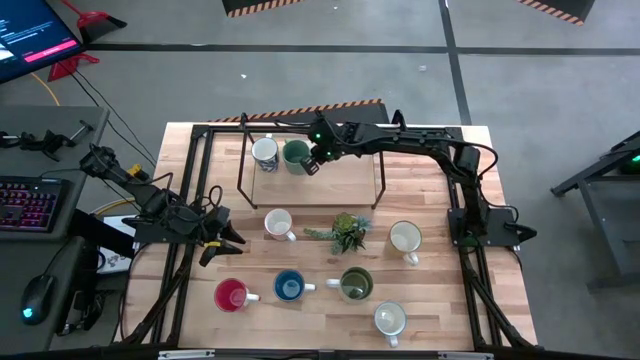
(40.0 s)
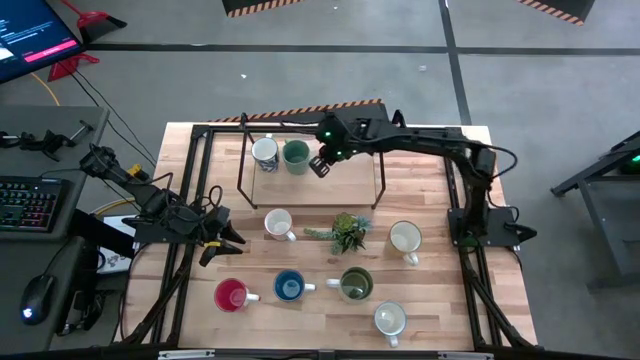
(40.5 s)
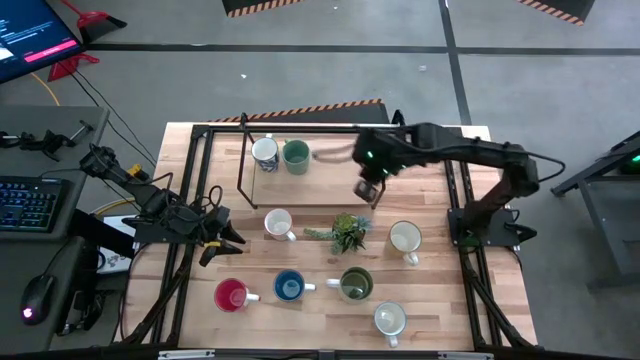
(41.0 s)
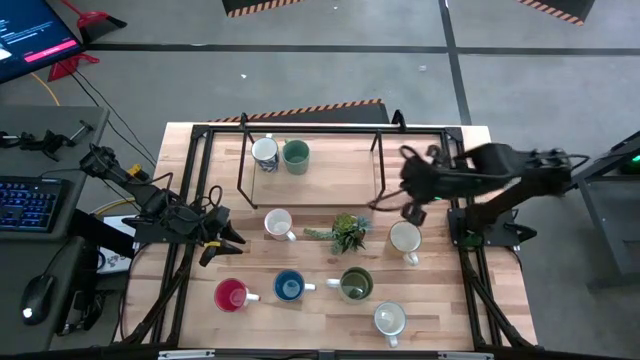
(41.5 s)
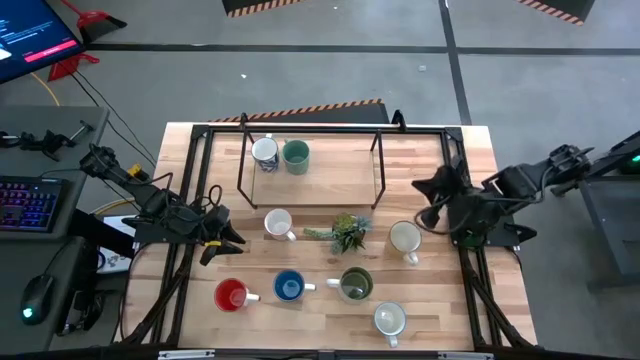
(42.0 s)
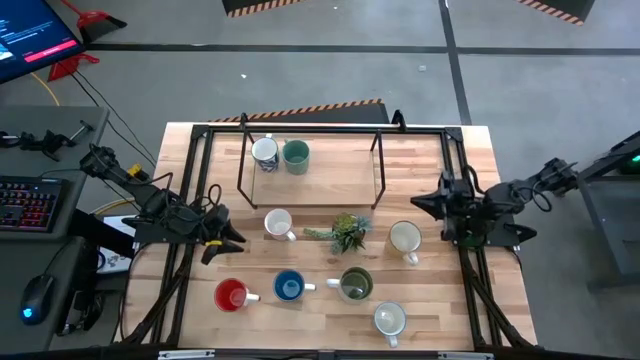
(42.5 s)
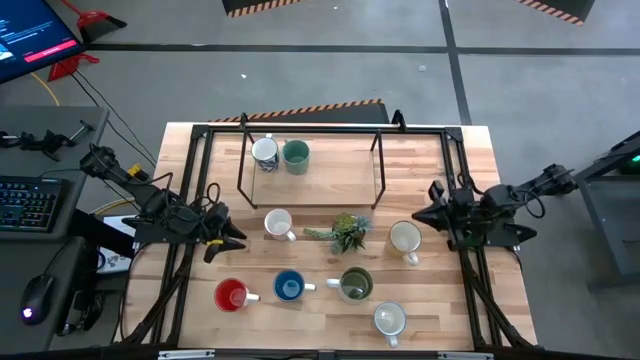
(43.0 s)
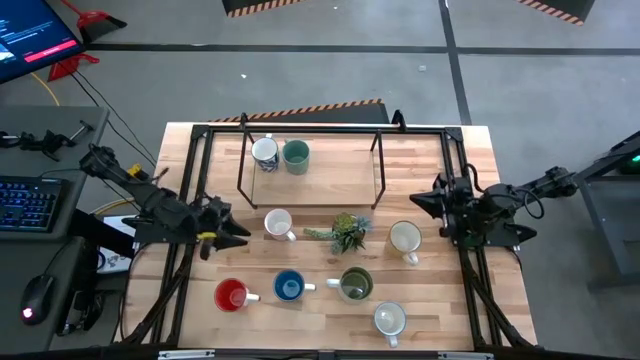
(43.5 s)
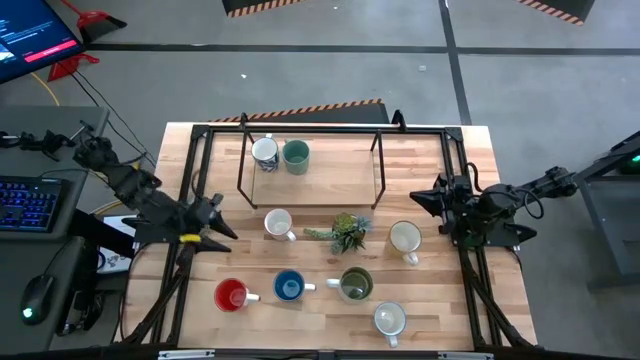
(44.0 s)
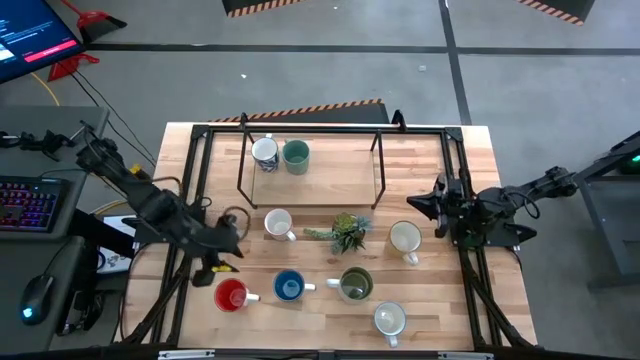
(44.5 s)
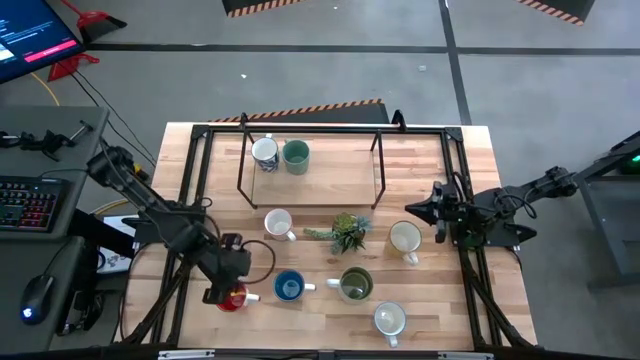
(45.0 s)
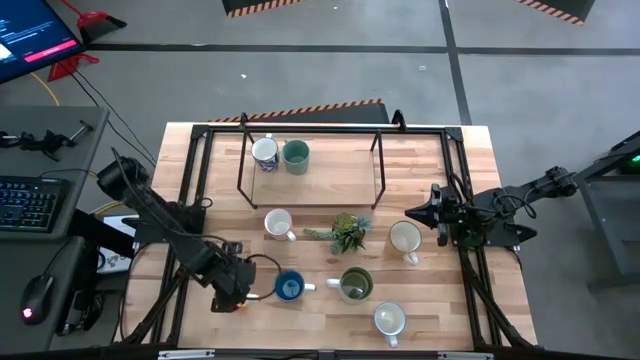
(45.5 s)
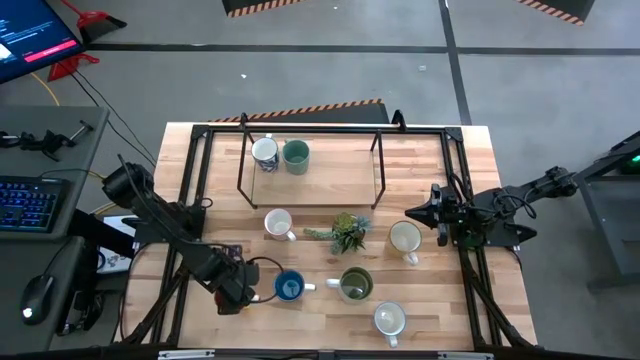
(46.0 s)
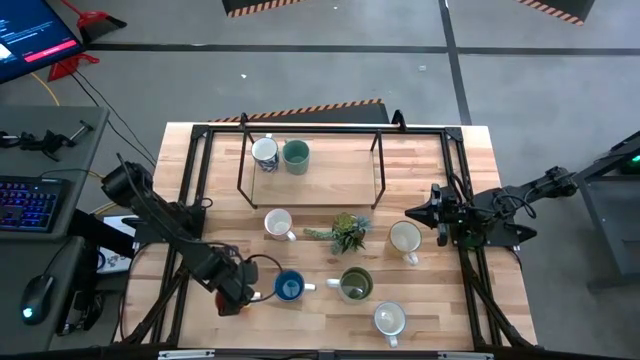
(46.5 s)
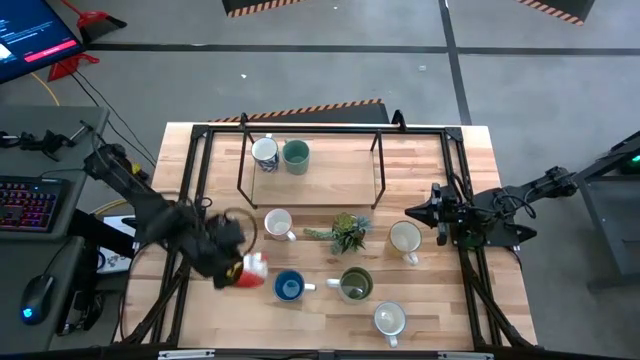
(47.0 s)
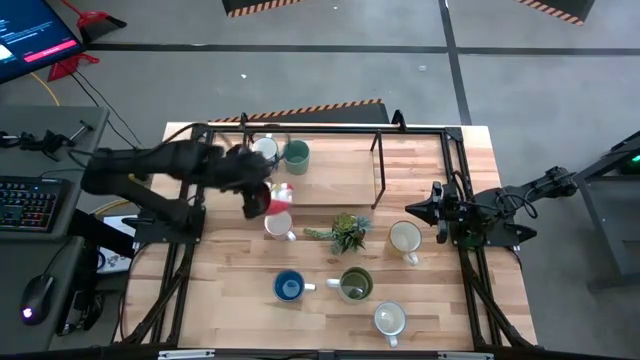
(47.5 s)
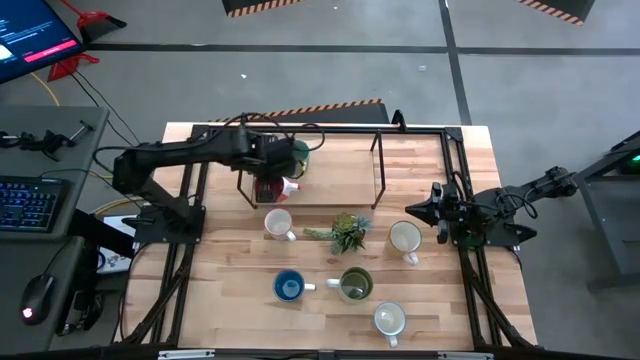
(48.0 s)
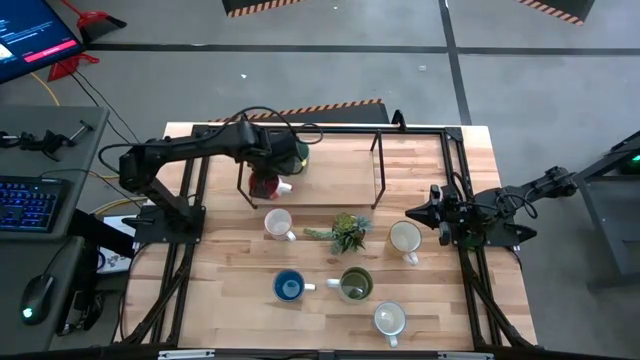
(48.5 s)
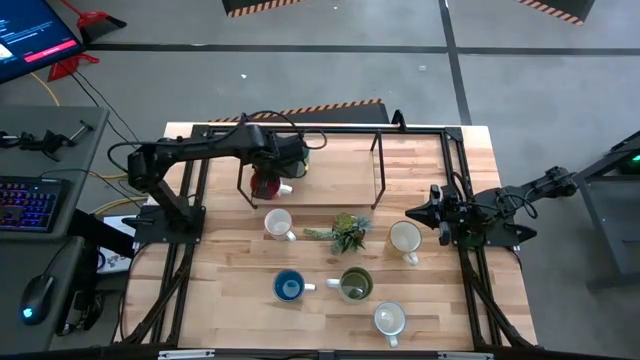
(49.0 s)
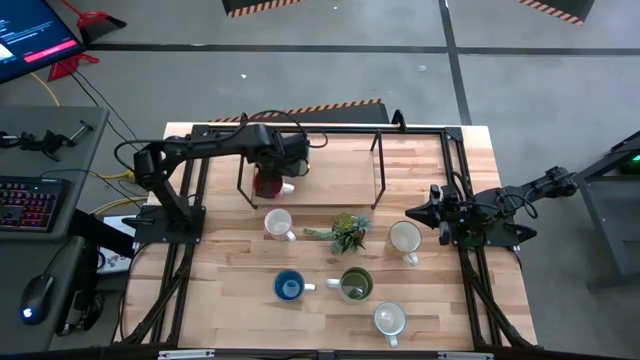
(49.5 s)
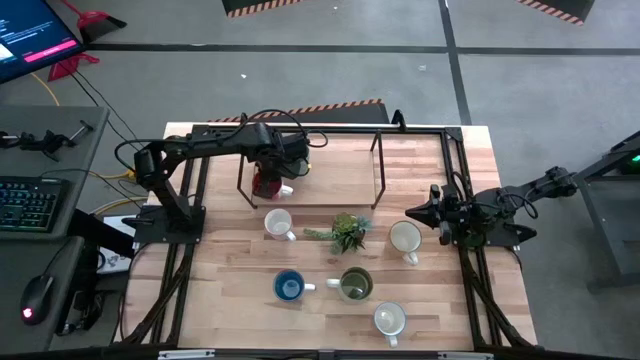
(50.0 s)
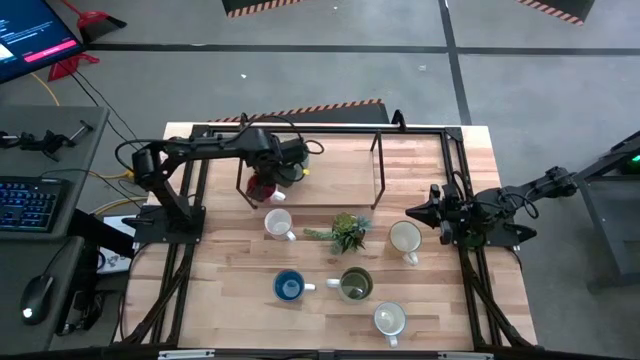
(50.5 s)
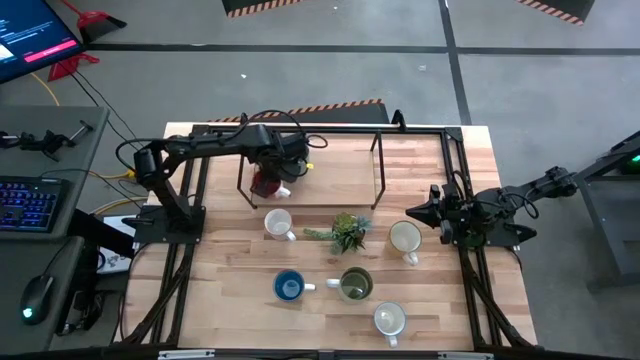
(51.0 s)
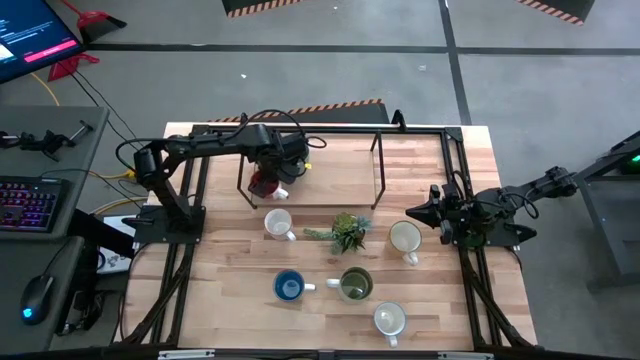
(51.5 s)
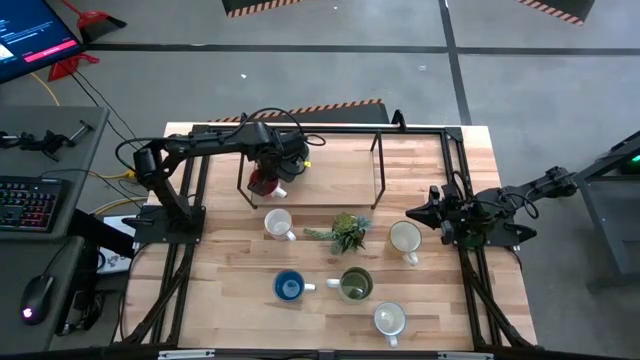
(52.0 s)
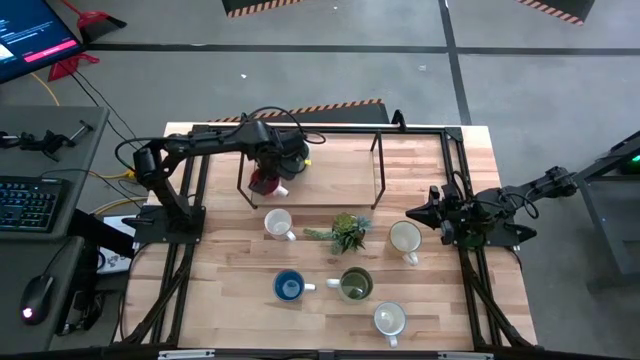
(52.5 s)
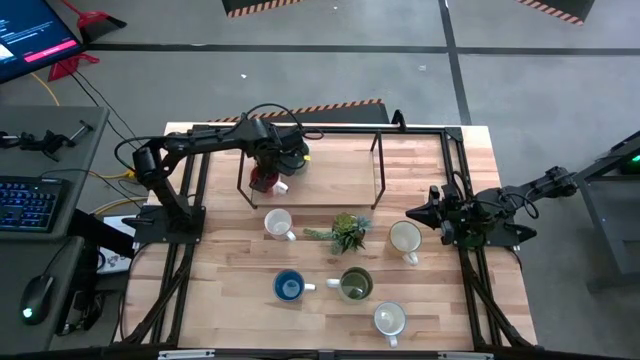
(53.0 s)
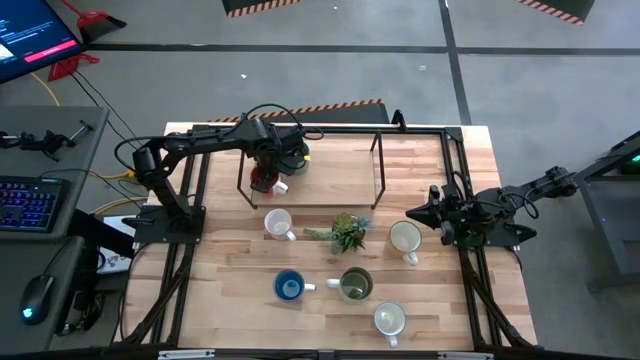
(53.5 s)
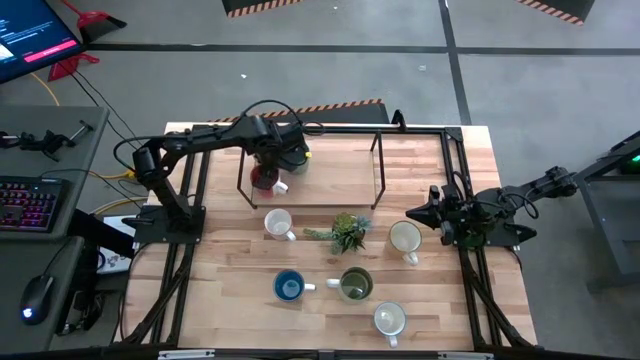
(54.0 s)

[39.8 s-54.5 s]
Task: Place coffee mugs
Put the red mug on the shelf

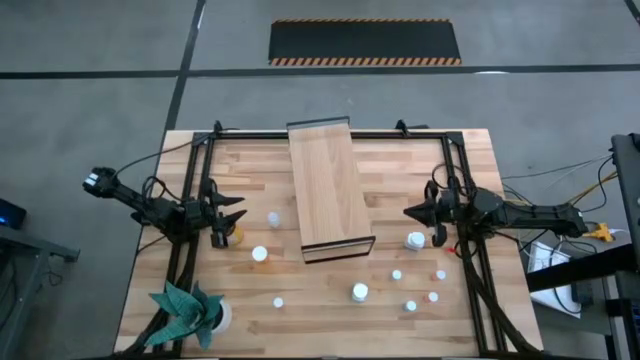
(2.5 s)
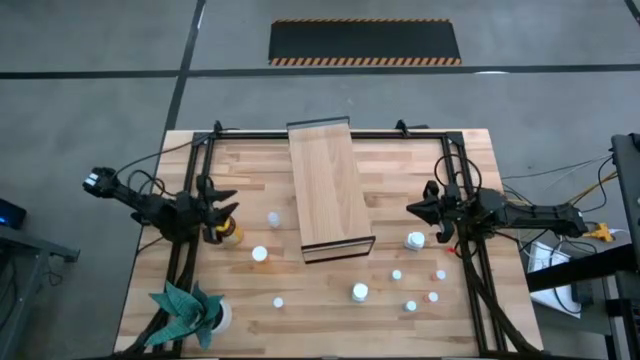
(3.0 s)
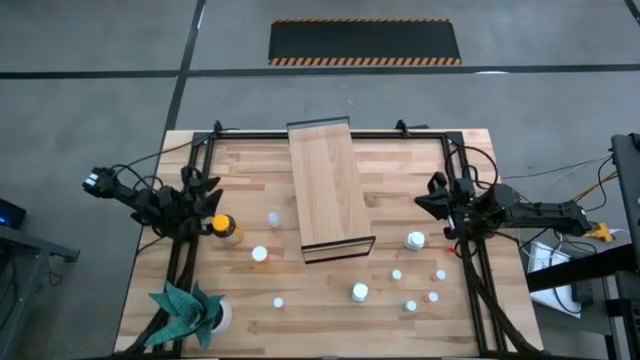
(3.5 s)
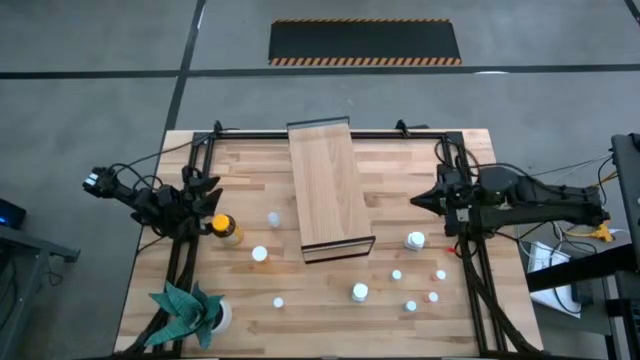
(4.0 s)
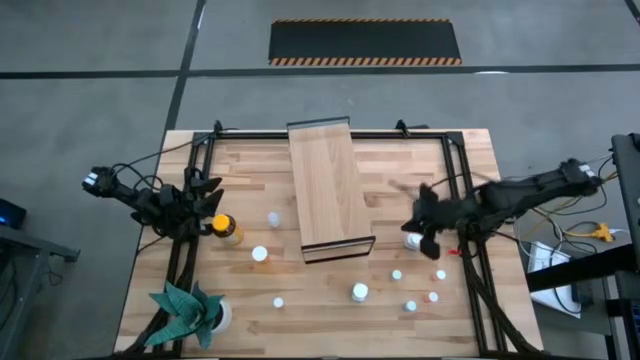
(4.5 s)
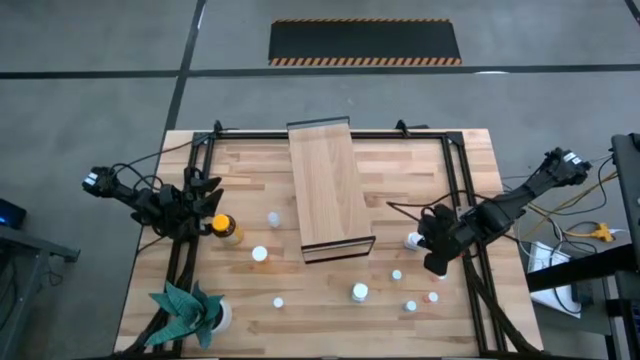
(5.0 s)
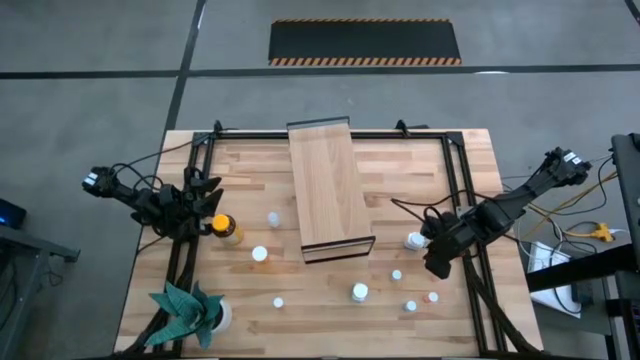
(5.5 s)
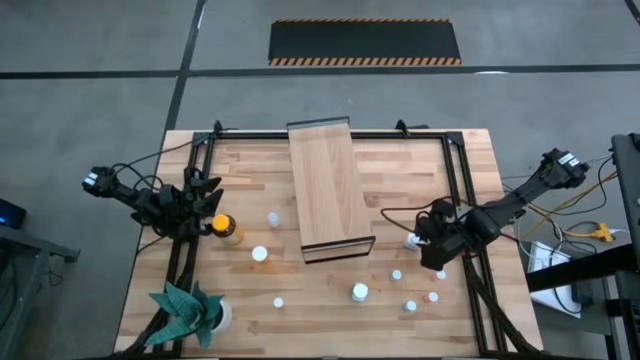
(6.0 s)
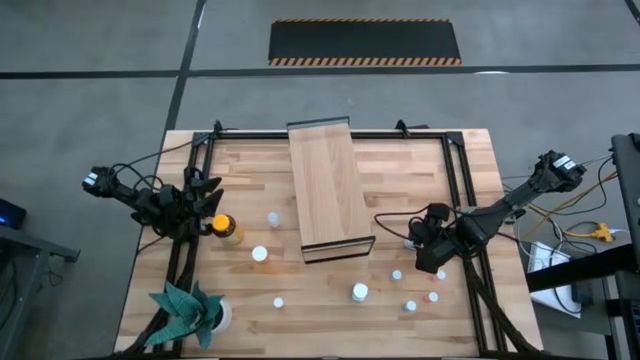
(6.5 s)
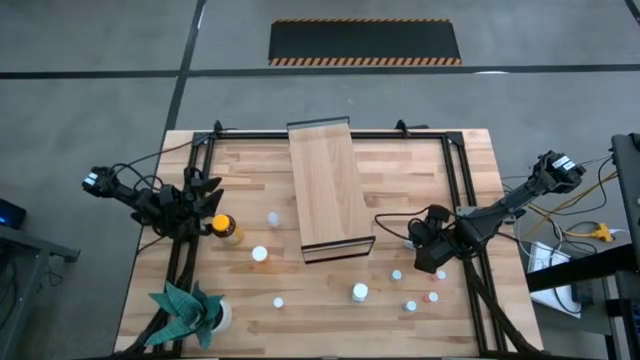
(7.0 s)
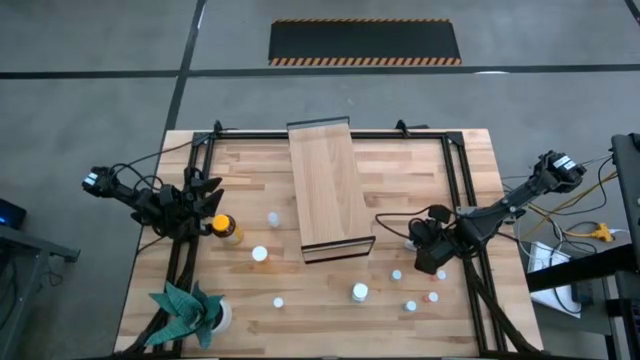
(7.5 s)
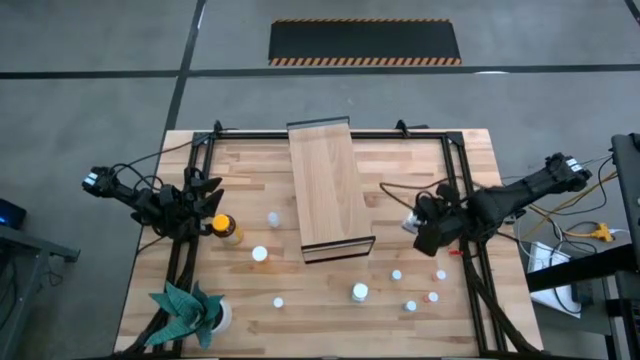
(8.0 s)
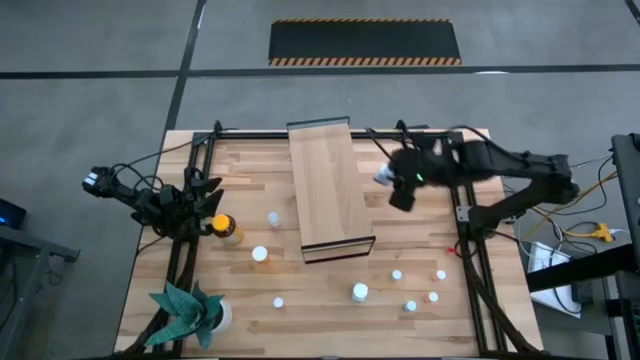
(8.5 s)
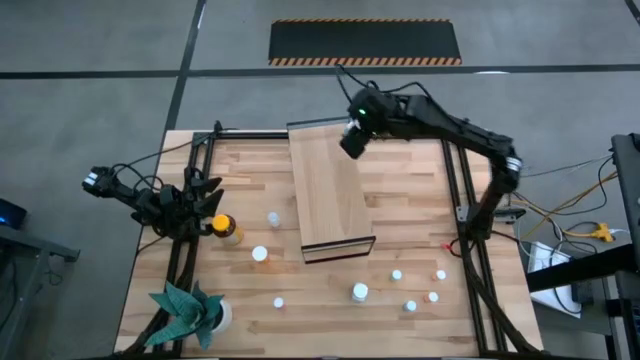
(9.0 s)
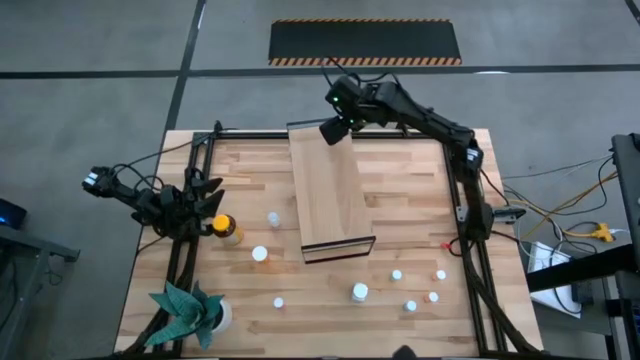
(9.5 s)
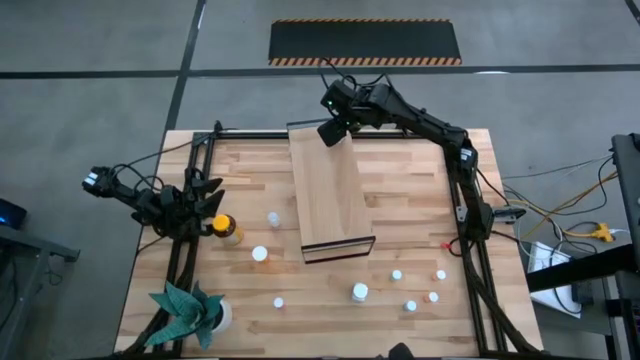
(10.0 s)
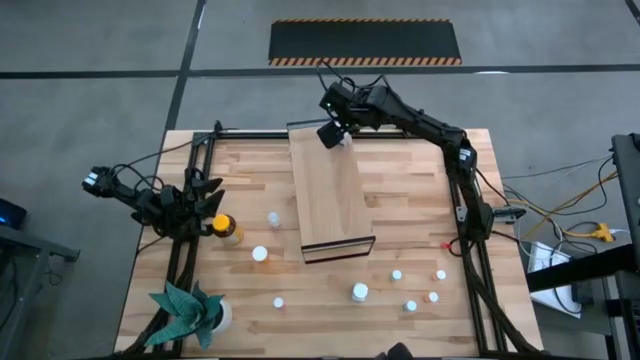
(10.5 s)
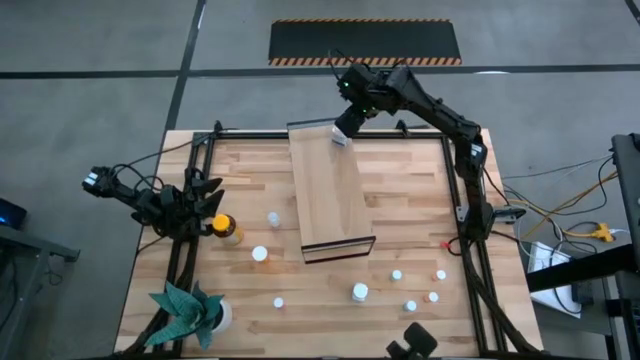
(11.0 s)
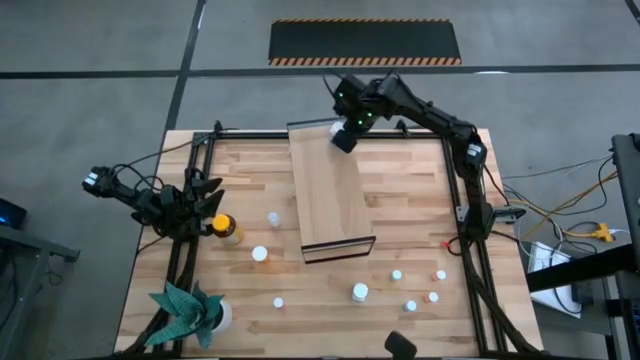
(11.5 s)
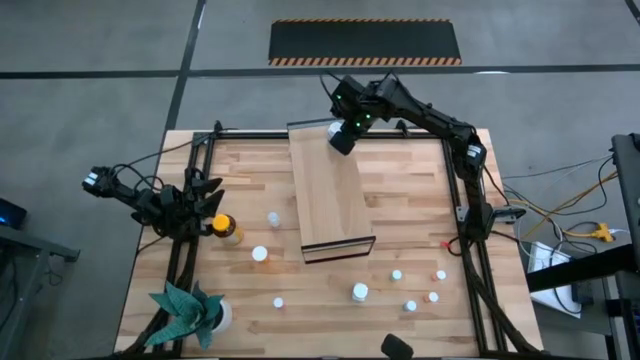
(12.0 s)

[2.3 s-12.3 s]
Task: Pick and place medicine bottles onto shelf by color
Put the top white pill bottle on the shelf
